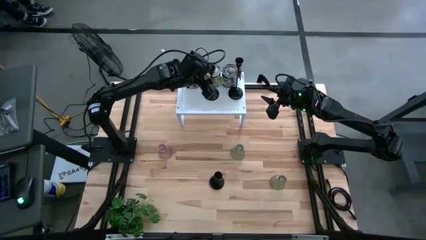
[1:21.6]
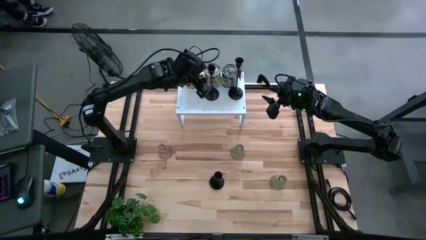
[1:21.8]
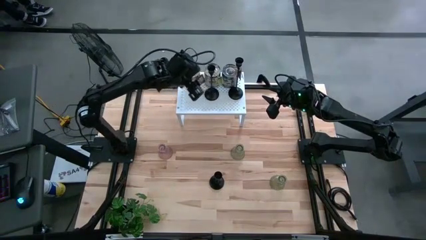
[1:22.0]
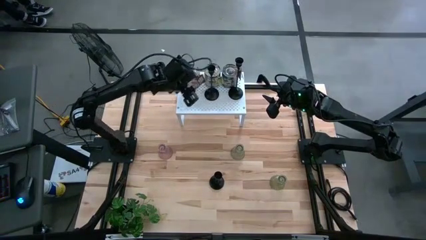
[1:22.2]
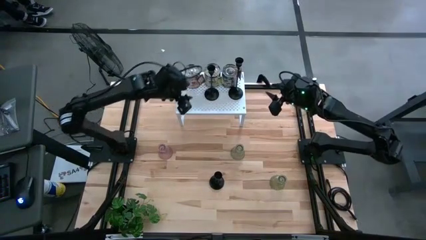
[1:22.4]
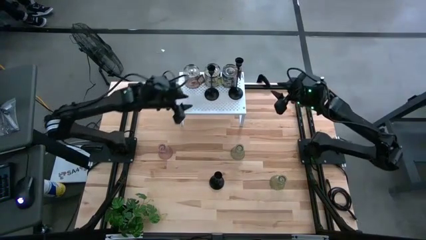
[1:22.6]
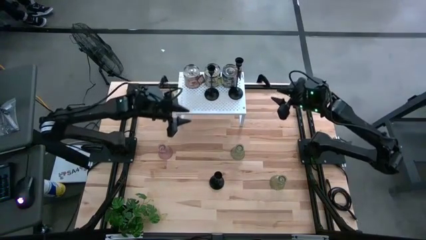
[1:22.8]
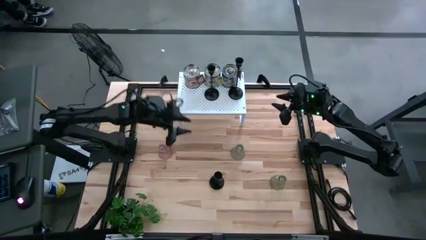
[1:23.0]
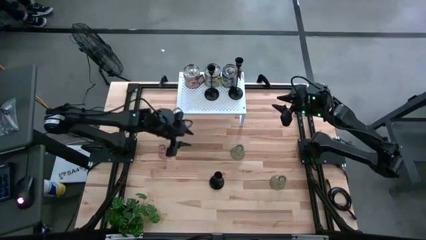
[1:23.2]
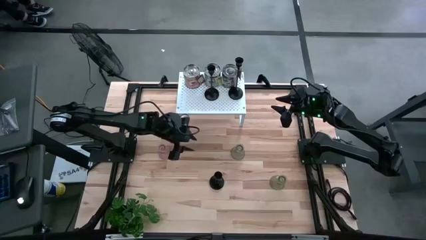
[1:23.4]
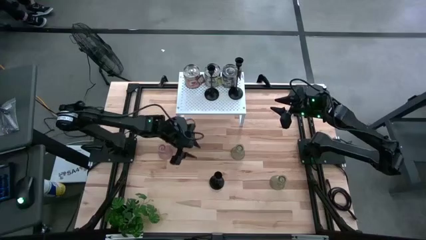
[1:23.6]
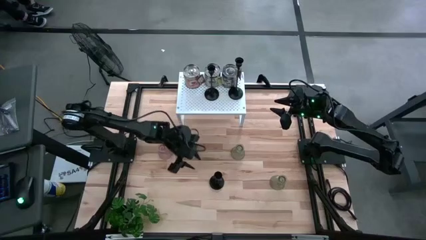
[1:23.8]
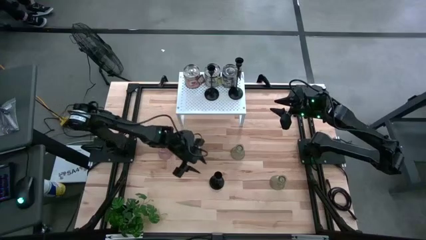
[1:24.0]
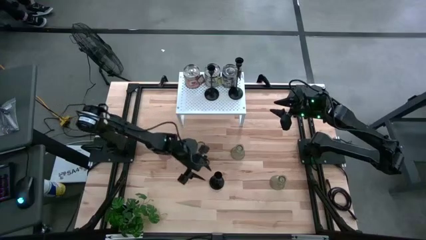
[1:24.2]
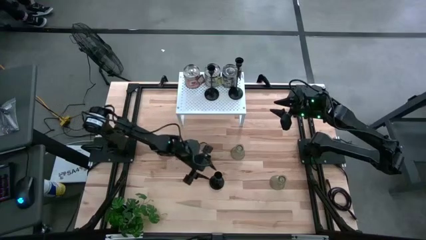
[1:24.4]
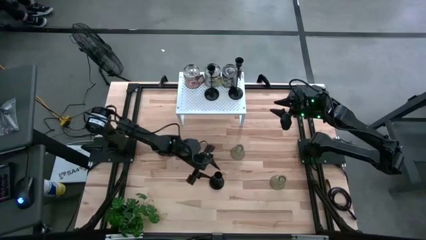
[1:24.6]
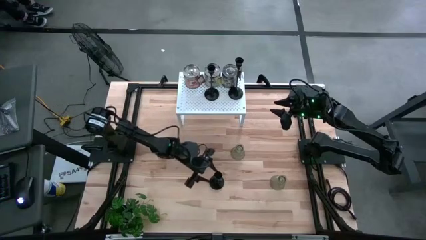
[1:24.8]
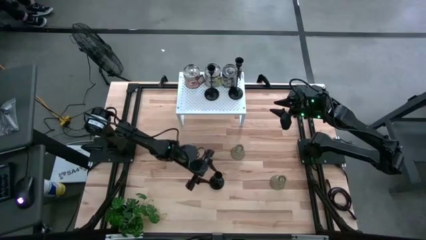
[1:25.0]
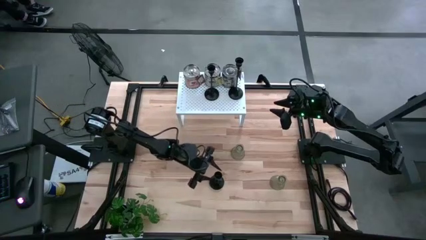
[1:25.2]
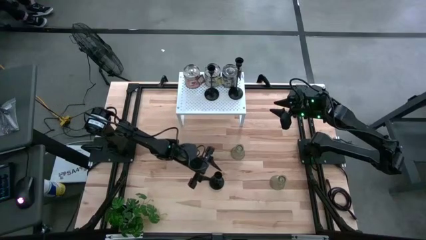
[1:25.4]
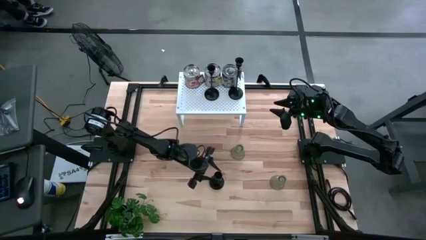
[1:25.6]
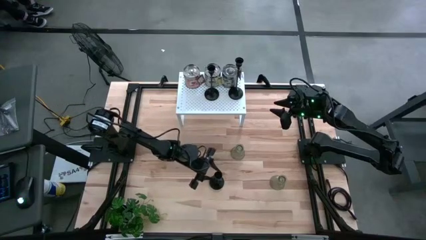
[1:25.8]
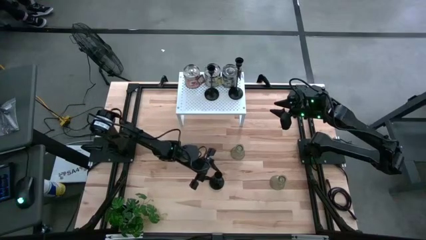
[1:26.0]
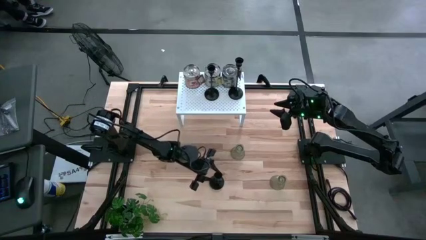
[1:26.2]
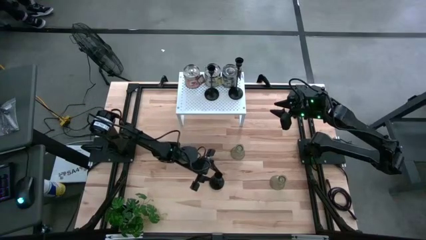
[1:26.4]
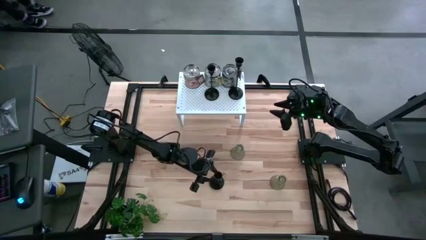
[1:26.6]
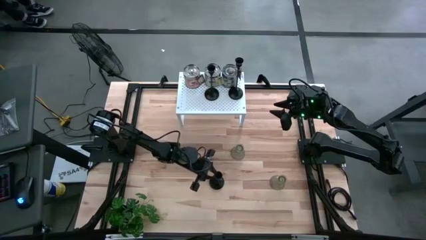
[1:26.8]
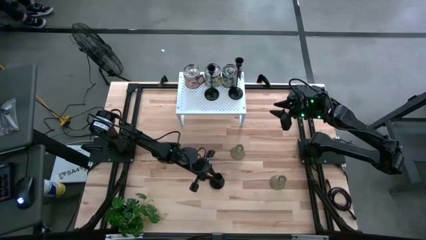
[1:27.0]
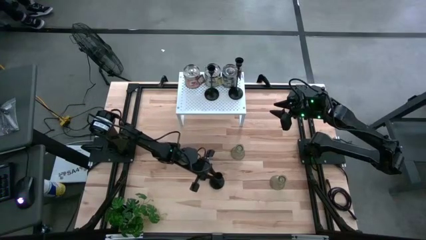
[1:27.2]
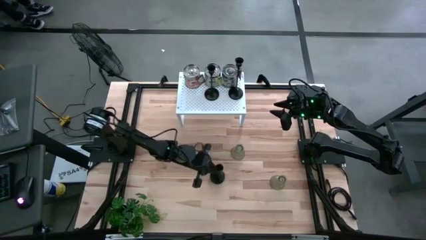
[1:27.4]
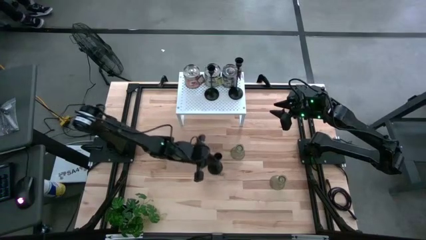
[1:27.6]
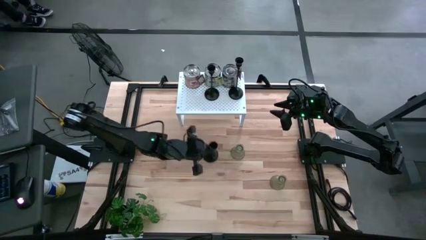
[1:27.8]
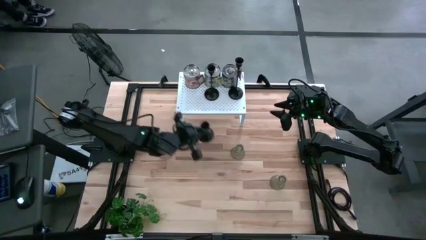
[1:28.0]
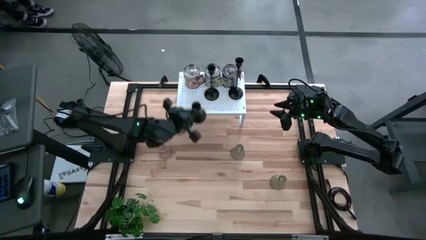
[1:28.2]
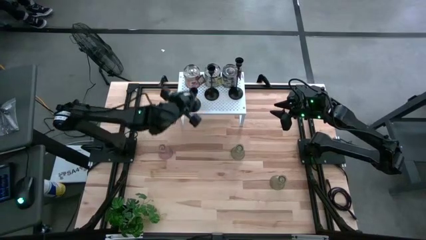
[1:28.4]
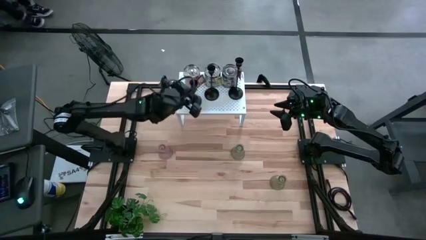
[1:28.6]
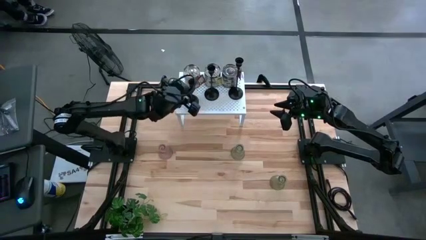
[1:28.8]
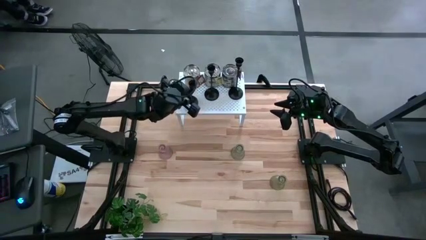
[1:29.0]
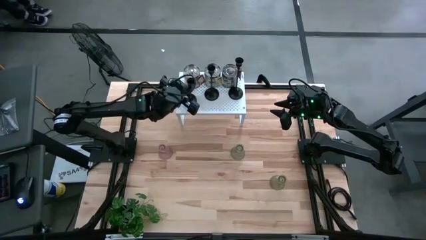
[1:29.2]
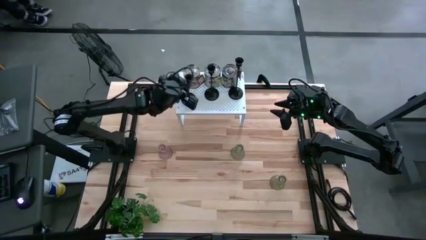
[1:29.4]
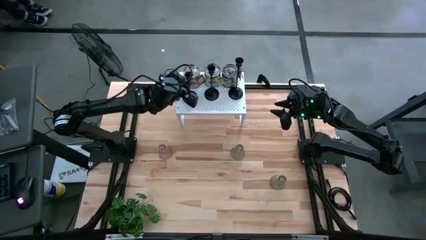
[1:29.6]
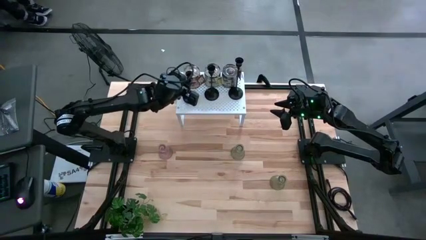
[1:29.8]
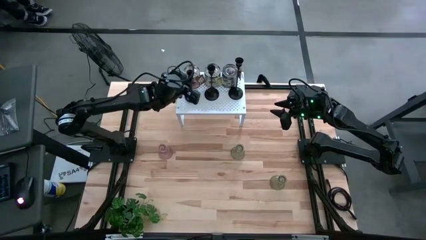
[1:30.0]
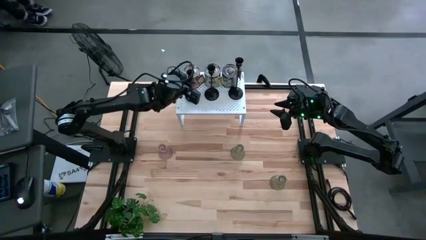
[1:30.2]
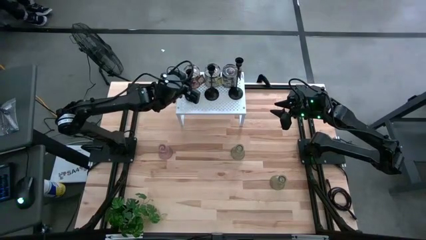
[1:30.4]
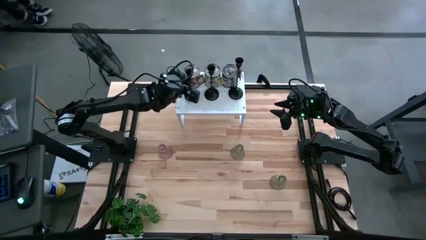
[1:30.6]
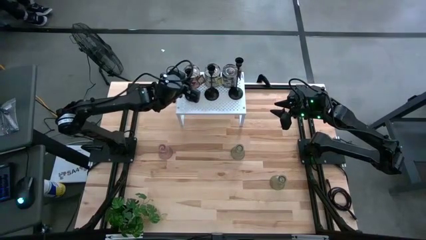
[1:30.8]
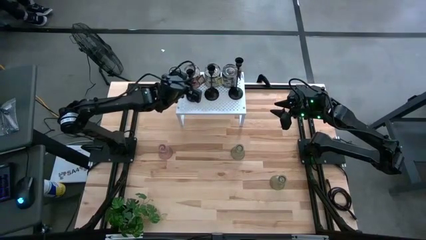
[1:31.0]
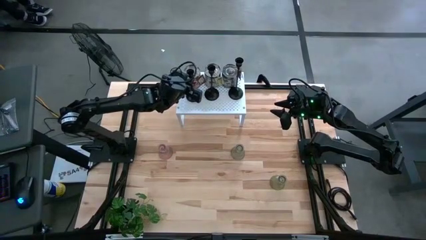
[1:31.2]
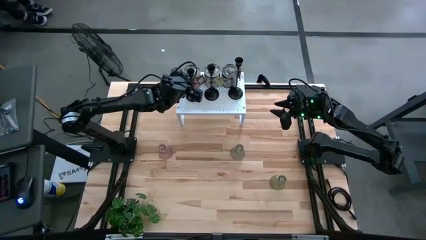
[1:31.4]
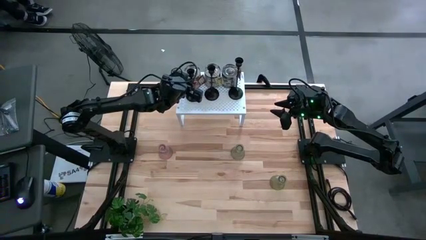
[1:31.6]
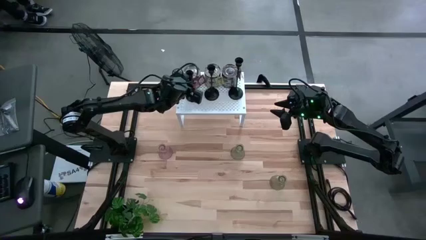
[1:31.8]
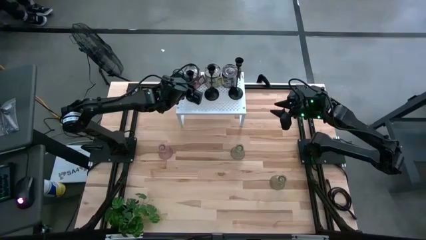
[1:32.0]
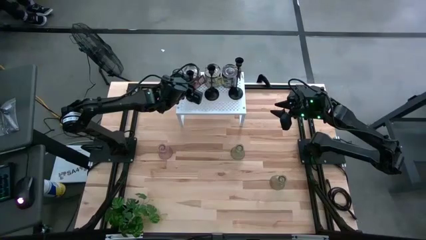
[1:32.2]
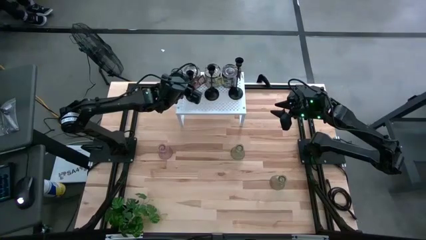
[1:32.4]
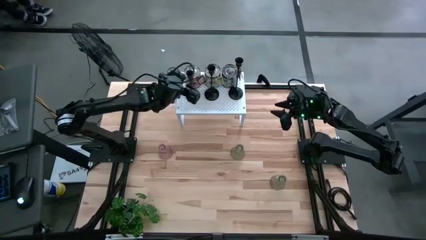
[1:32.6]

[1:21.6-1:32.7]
Task: Pick & Place candle stick holders
Align the black candle holder on the shelf with the other black candle holders

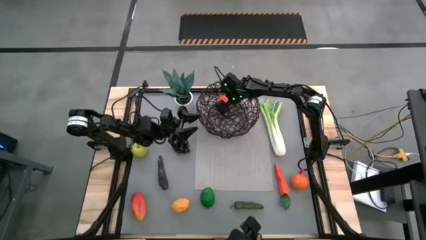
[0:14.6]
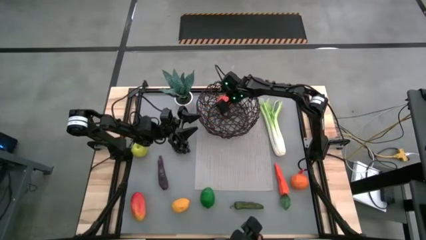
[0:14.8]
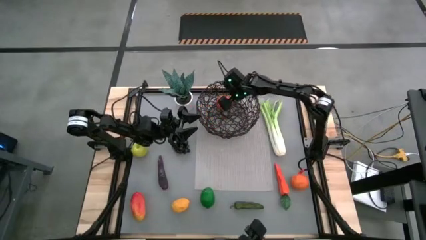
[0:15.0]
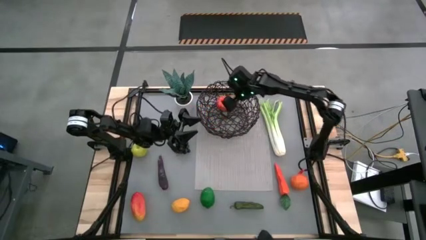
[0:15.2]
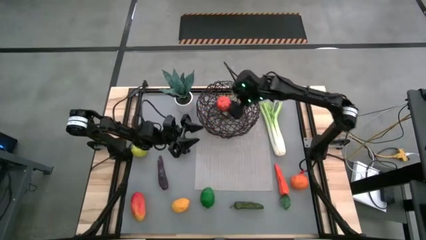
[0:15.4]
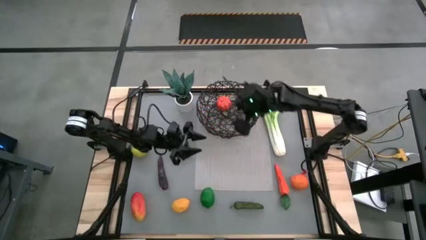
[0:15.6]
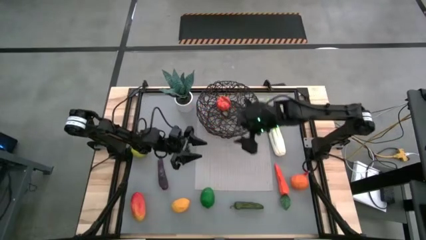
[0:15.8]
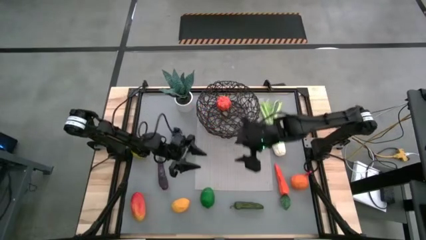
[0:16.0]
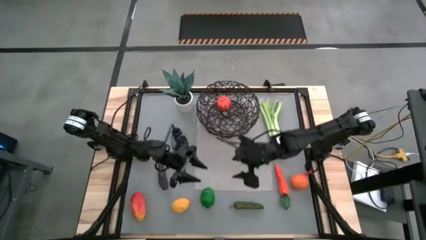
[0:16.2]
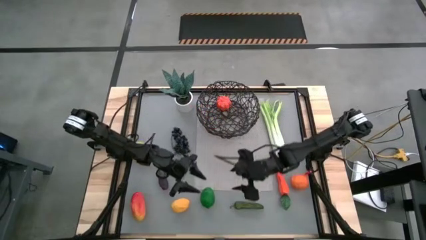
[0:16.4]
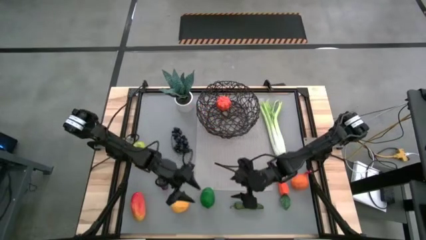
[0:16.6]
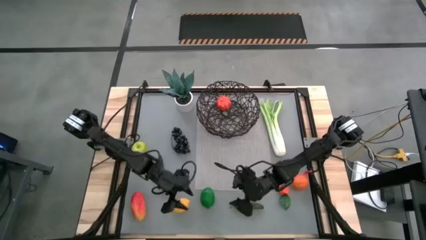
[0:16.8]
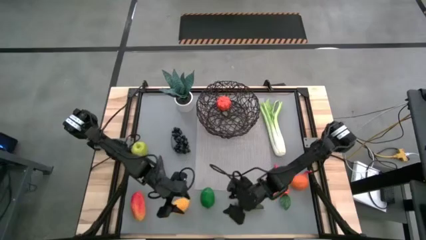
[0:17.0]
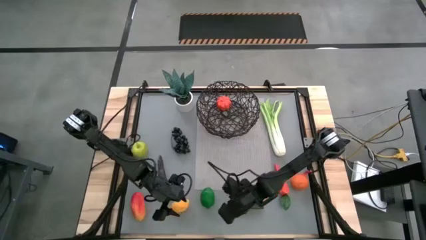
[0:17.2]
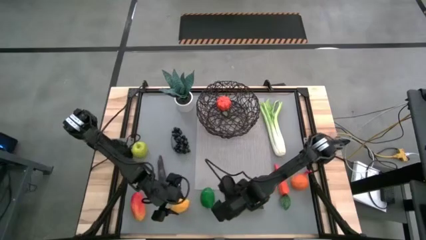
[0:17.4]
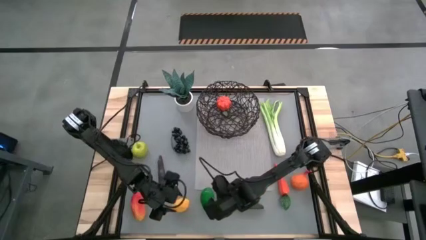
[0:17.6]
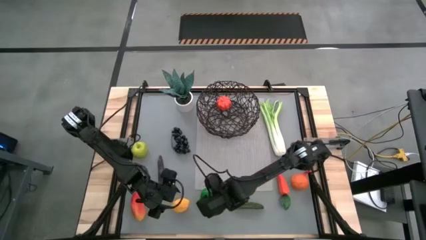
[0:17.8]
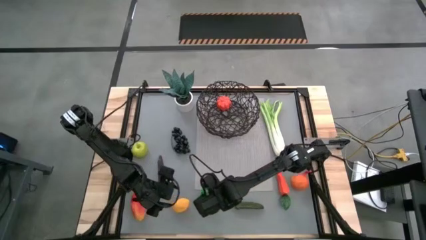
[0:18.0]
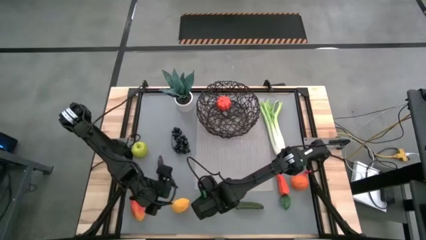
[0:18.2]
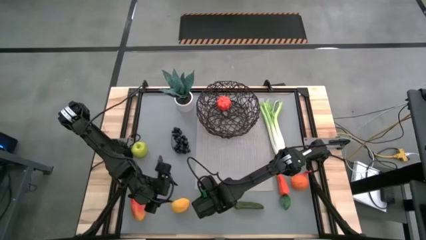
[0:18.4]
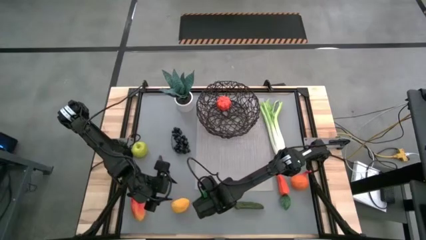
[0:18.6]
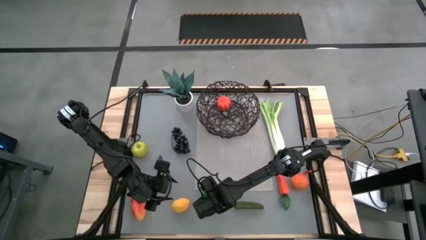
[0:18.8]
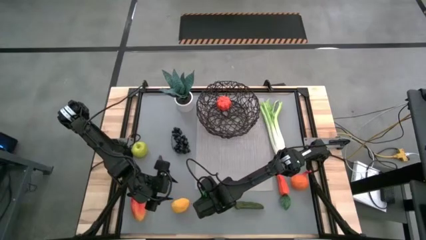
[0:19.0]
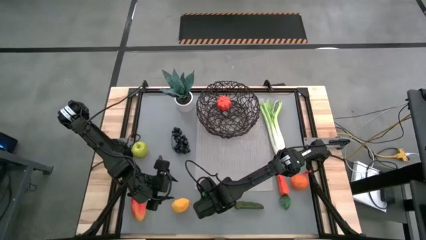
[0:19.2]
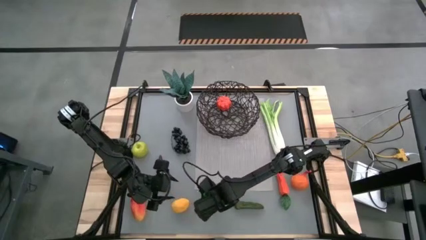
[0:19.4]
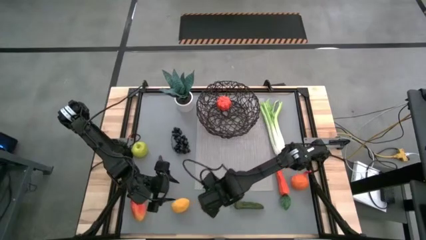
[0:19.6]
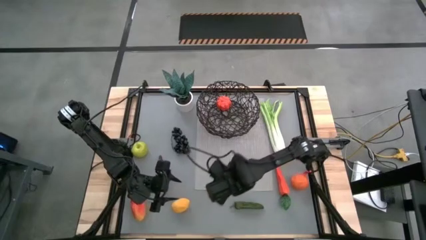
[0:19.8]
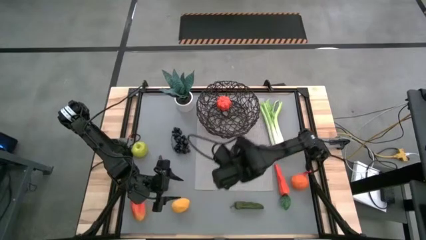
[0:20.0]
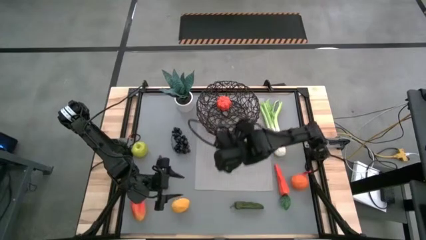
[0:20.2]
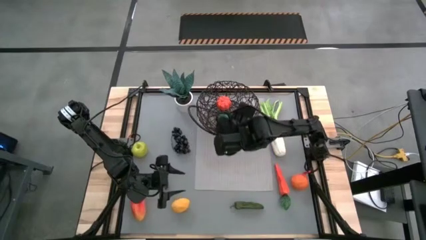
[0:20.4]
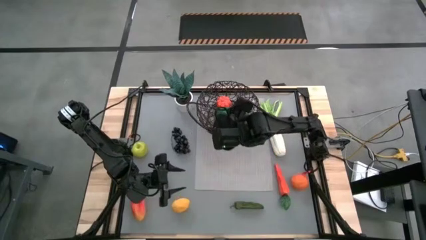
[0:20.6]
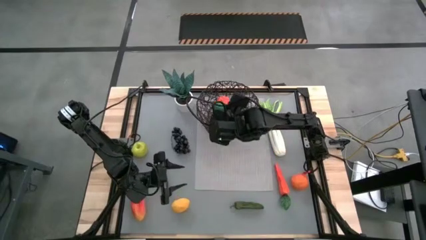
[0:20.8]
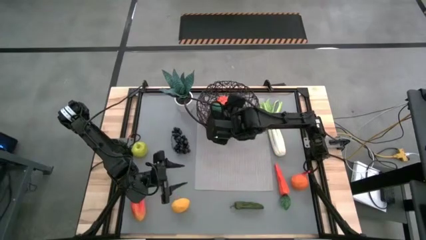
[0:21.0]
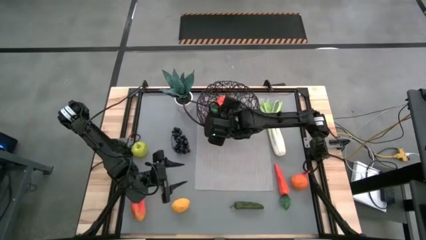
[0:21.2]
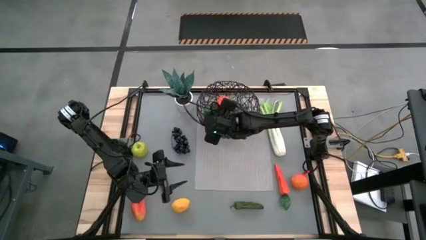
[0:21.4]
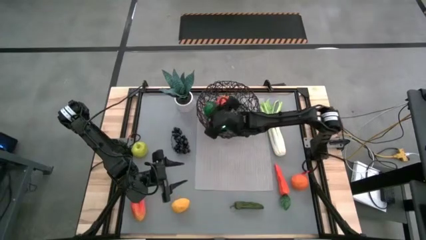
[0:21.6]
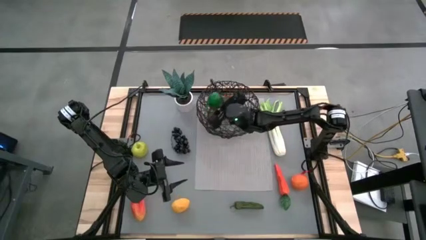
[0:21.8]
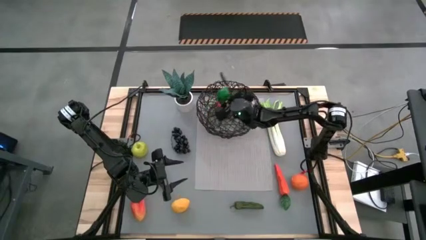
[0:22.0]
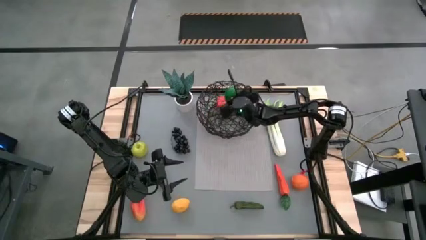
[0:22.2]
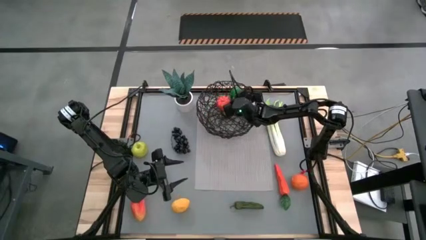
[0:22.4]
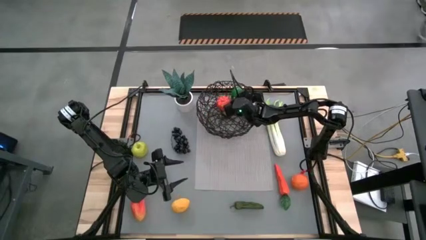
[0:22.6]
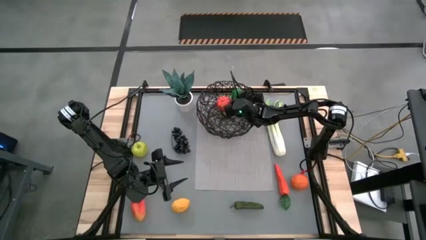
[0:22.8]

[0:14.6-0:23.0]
Task: Build produce basket
Put the green lime into the black wire basket
